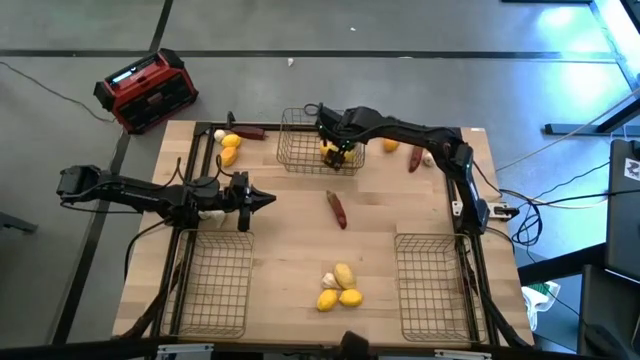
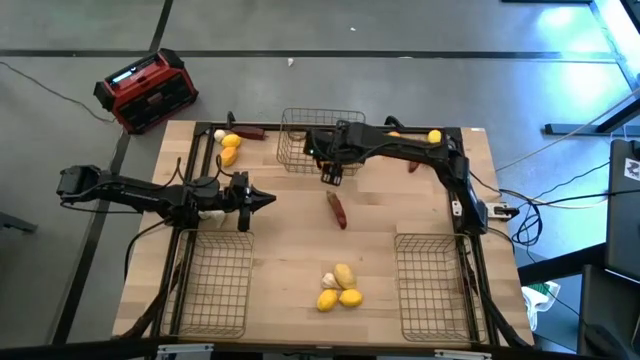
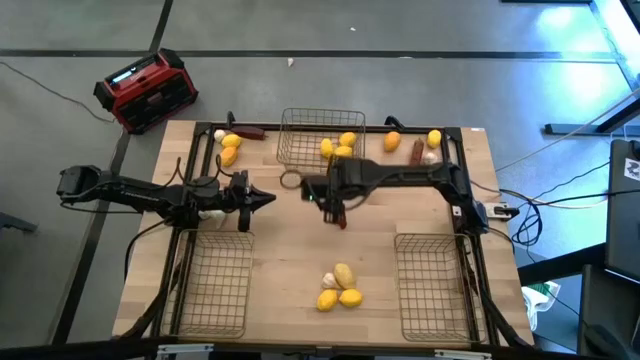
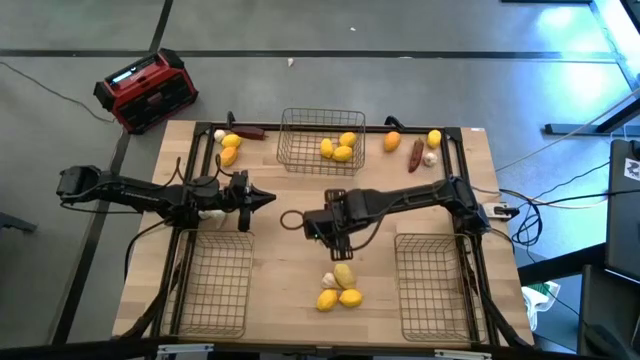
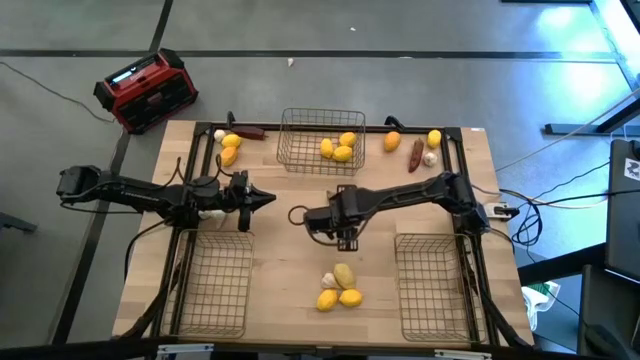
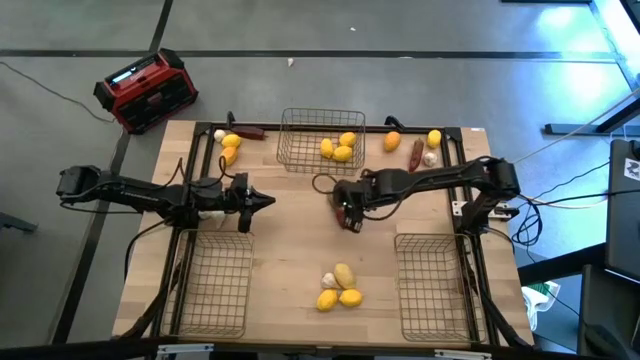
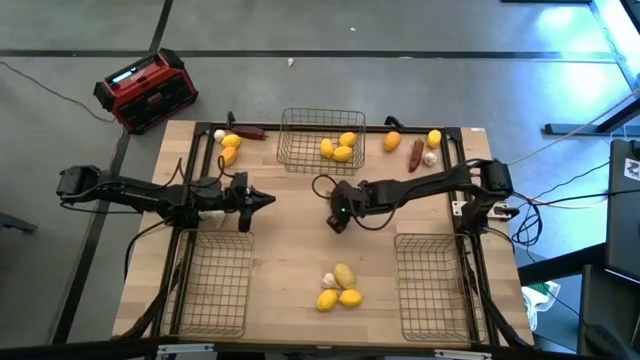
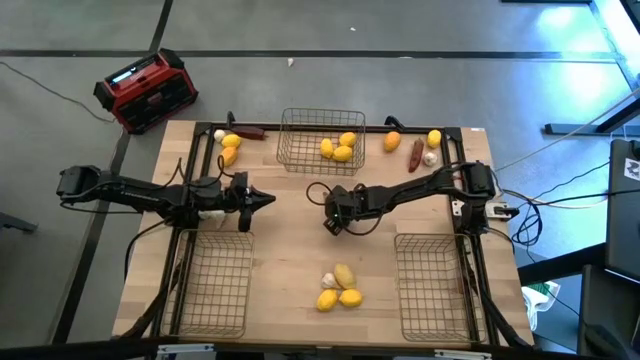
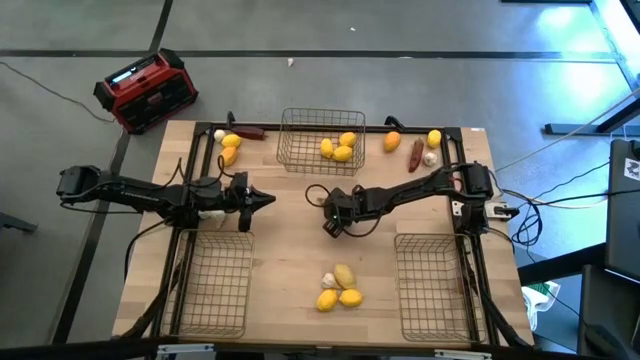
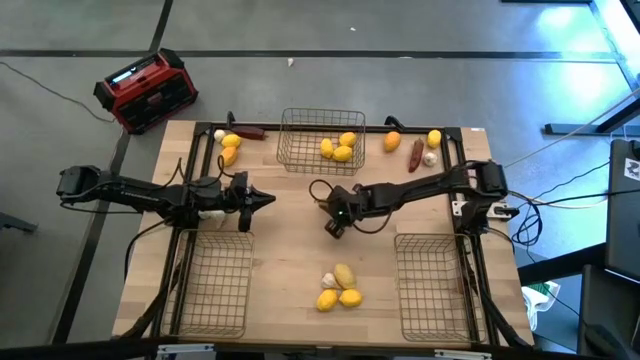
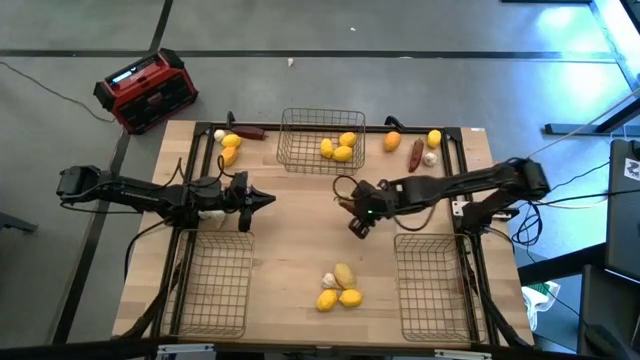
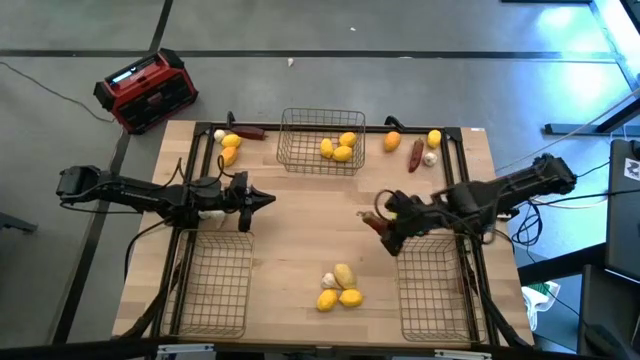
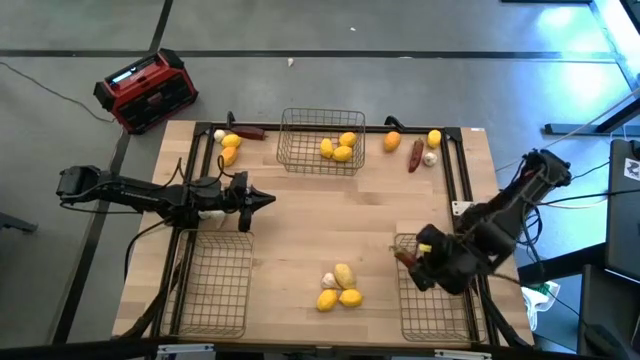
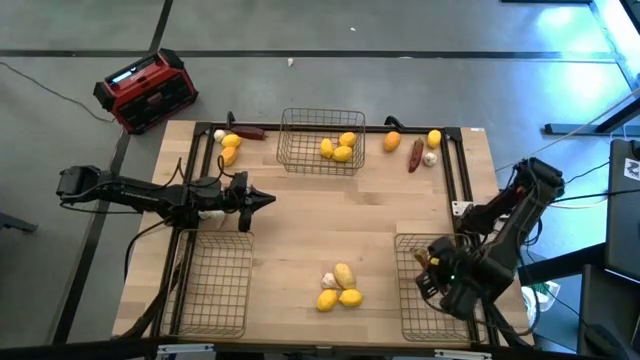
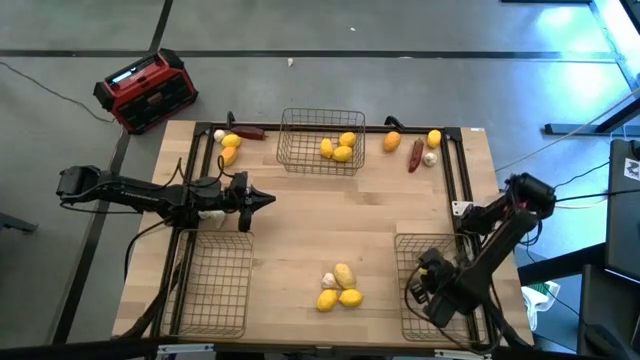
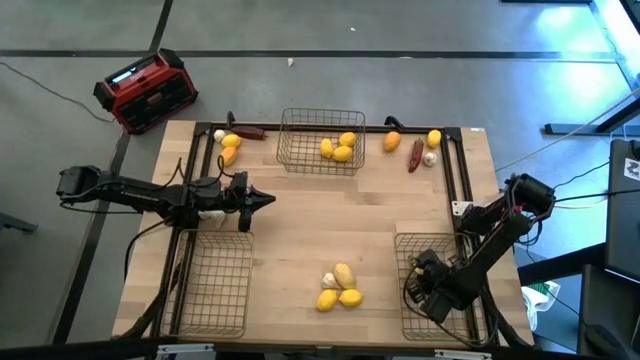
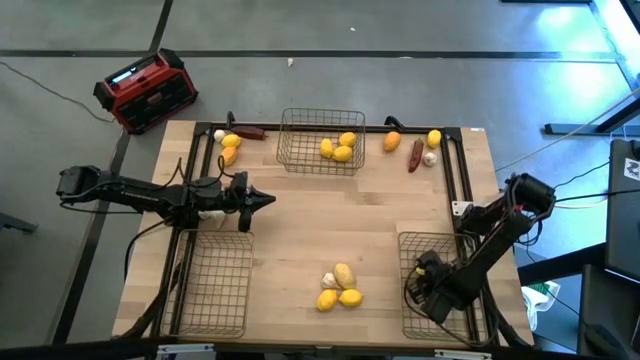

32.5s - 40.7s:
Task: Sort produce into baskets
Put the chili bell pepper into the bottom right wire basket

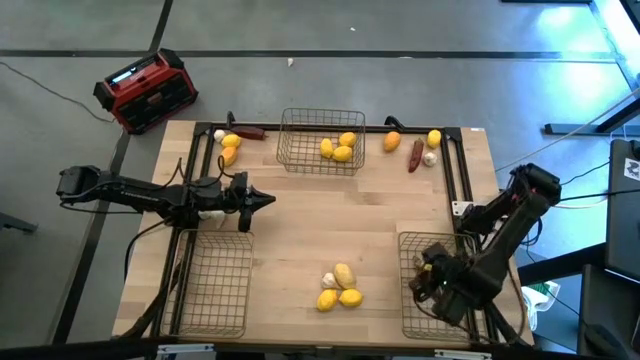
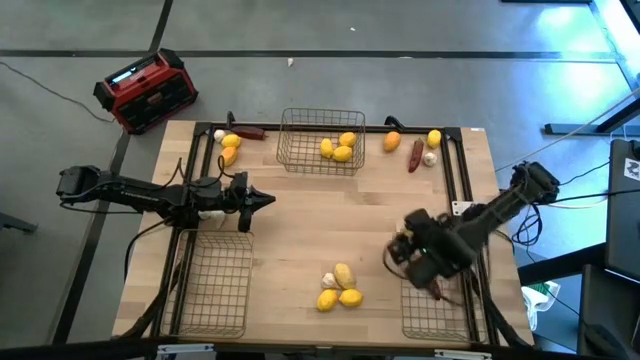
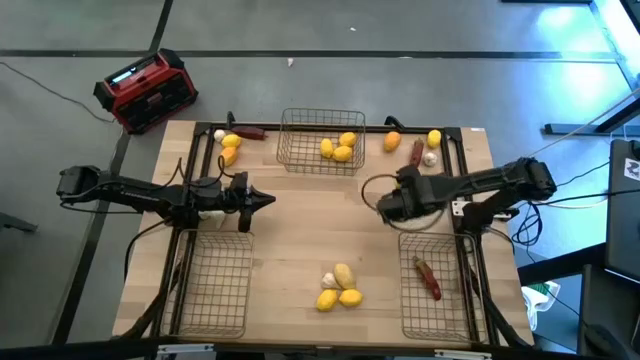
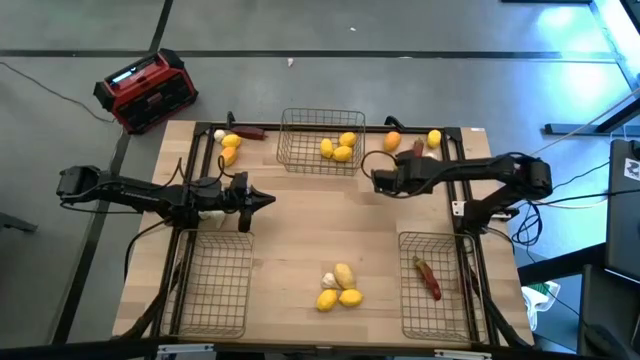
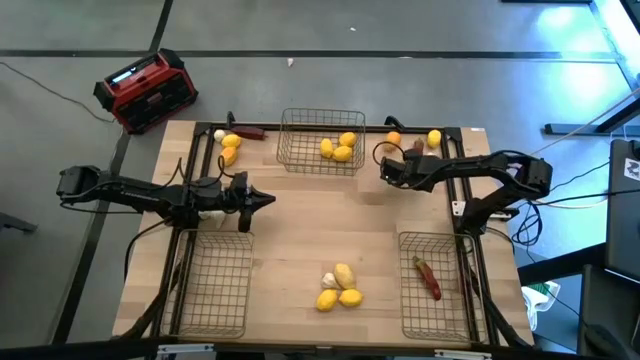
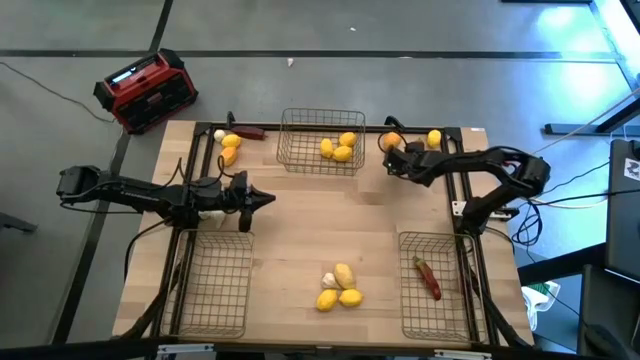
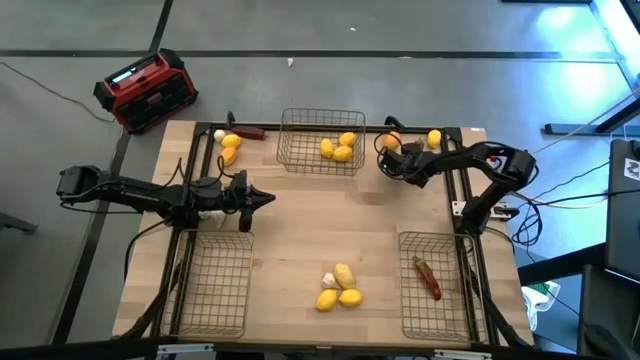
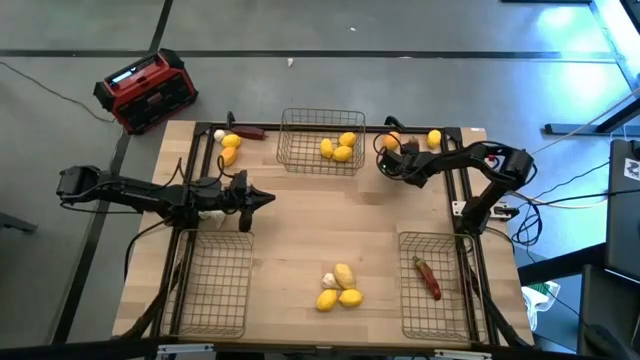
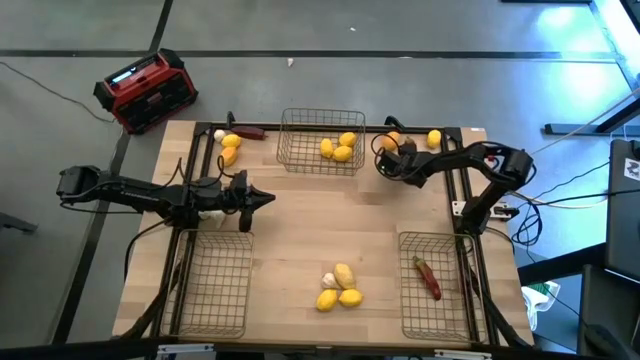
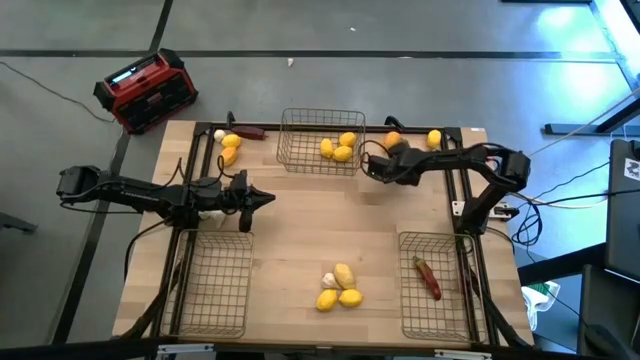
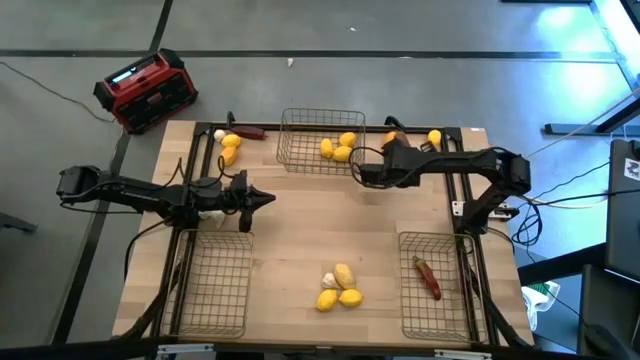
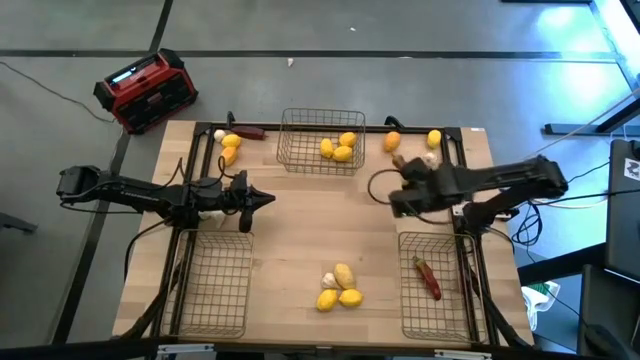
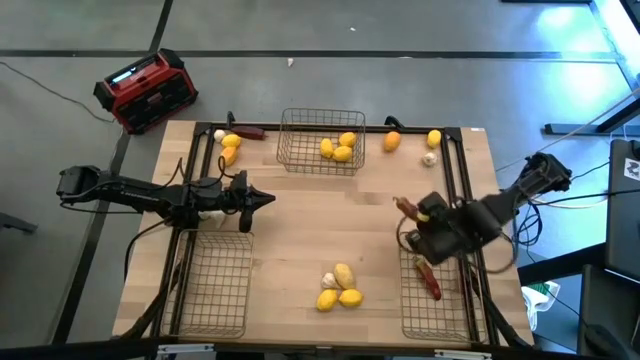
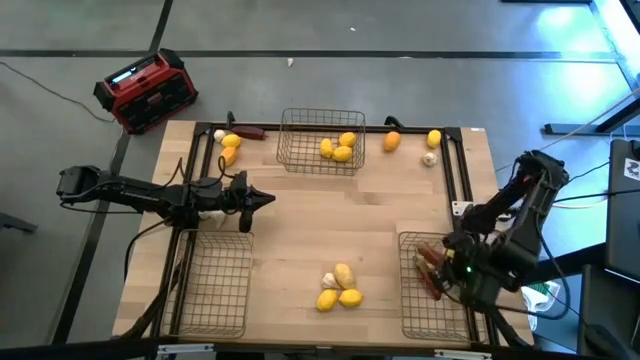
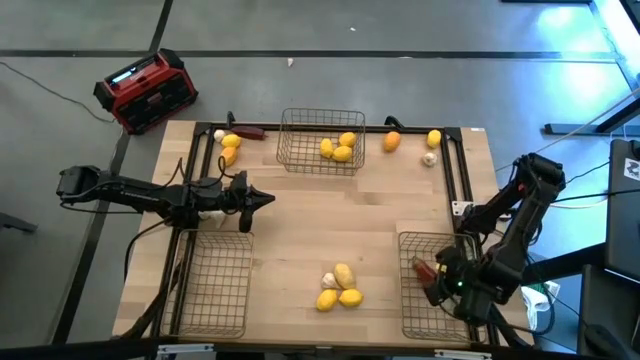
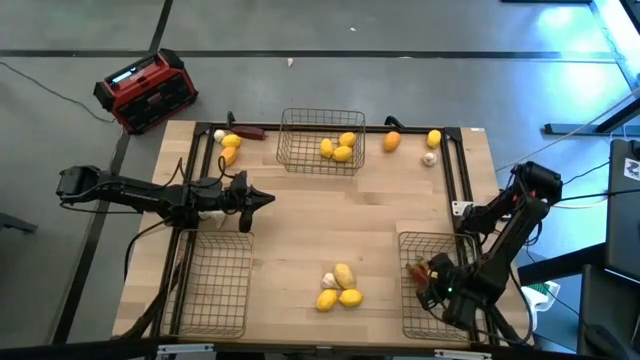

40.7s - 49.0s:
Put the chili bell pepper into the bottom right wire basket

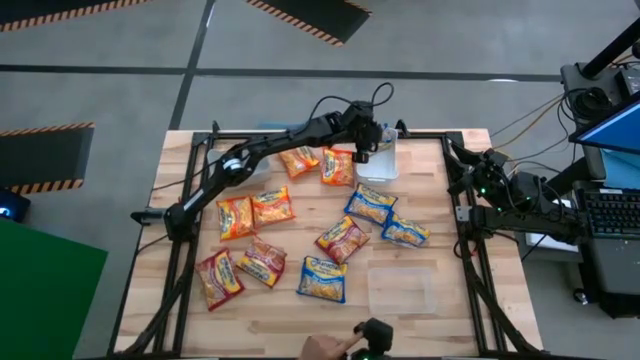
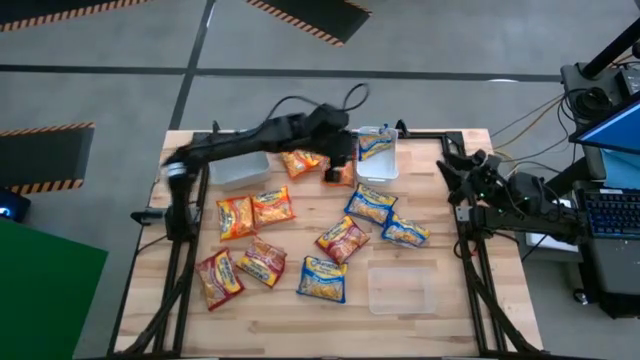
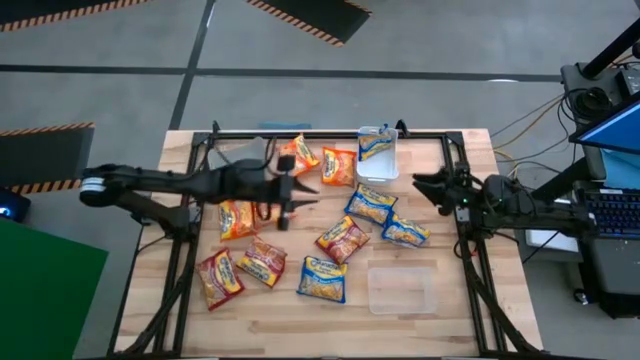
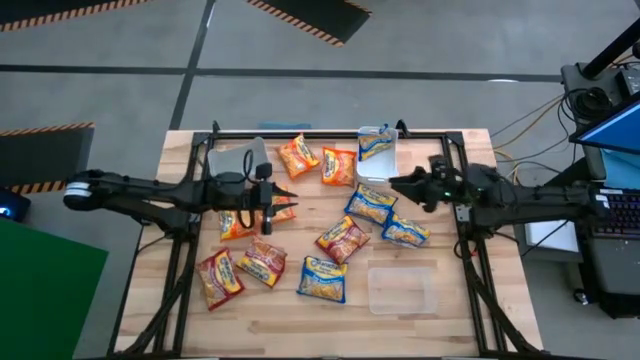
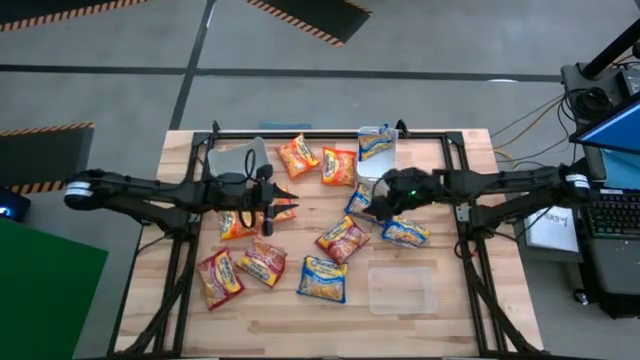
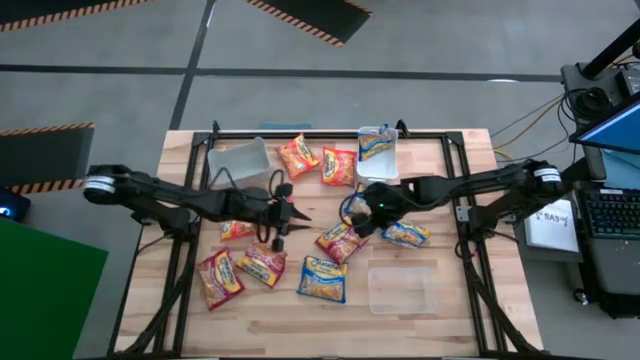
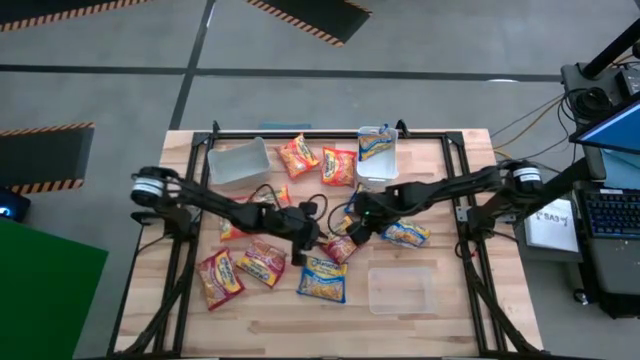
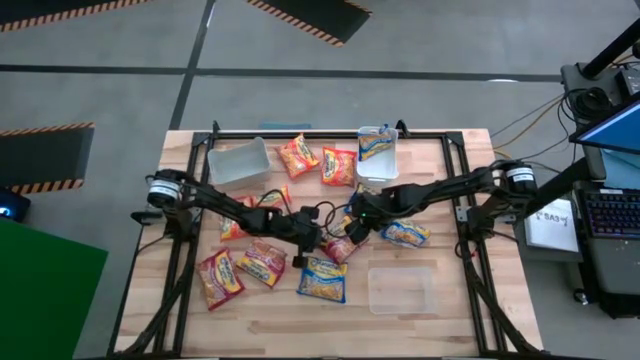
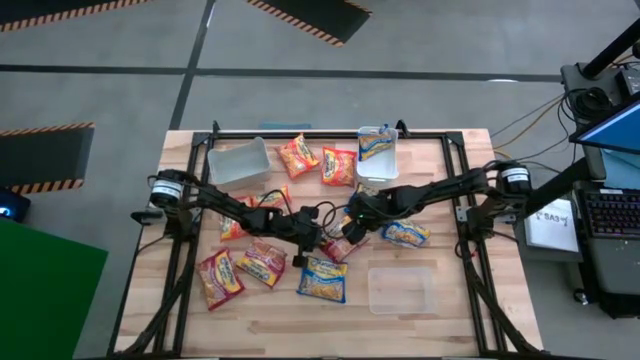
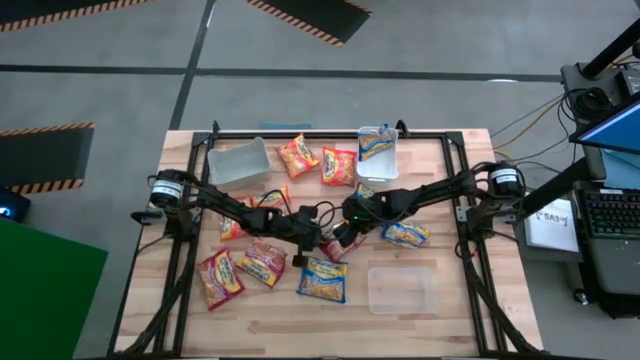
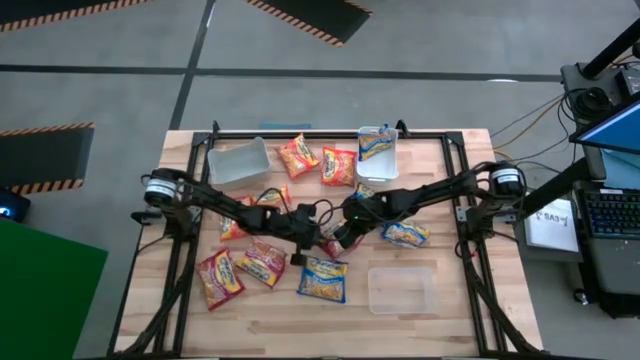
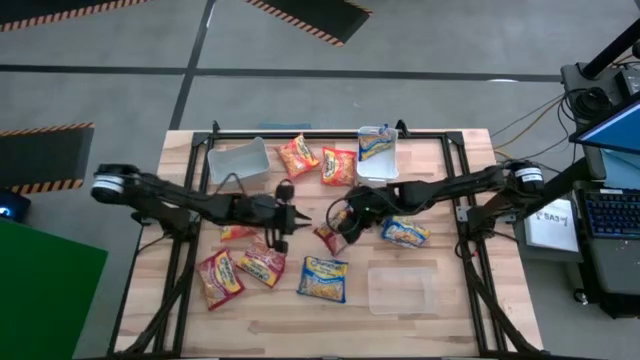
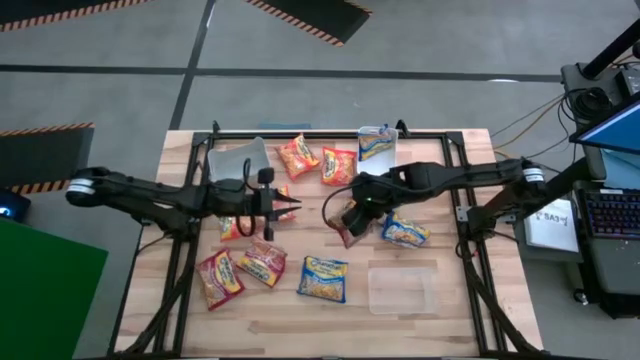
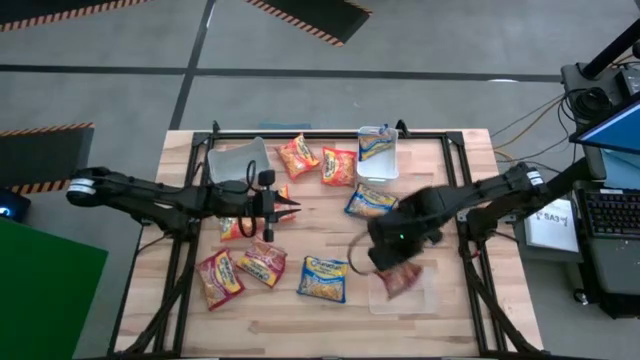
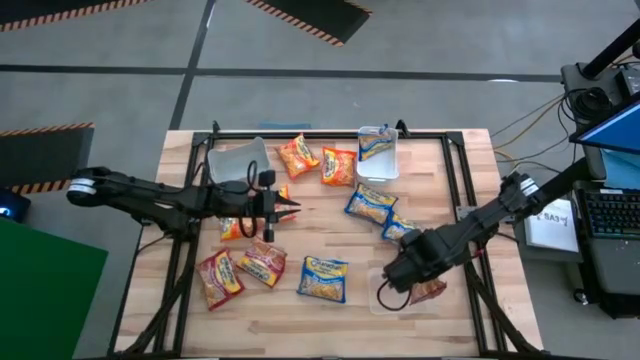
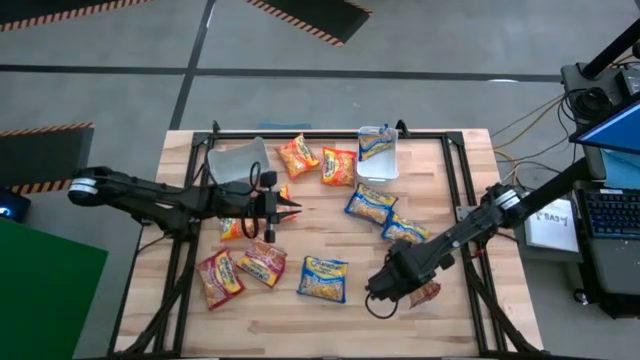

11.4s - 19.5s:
Task: Sort Maruchan noodles
Put the red noodle pack into the transparent bin
